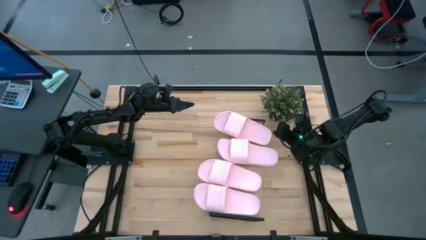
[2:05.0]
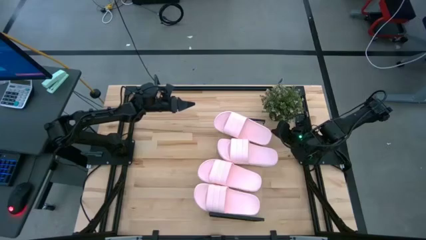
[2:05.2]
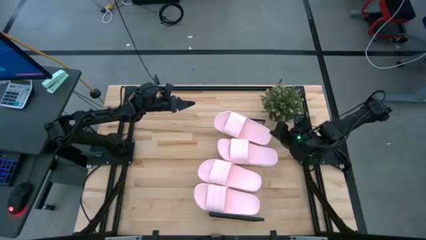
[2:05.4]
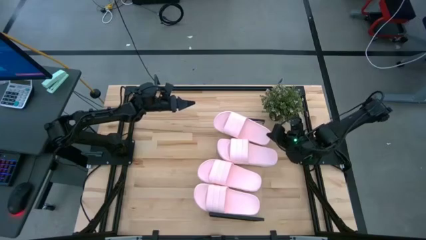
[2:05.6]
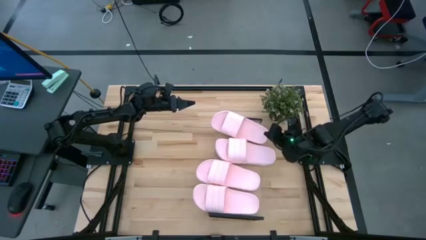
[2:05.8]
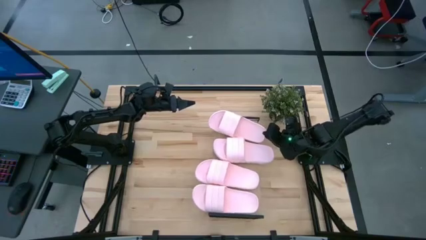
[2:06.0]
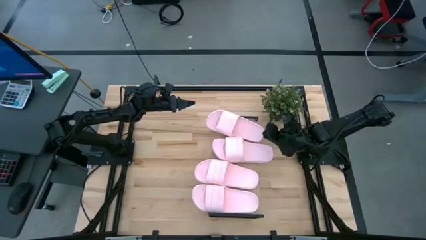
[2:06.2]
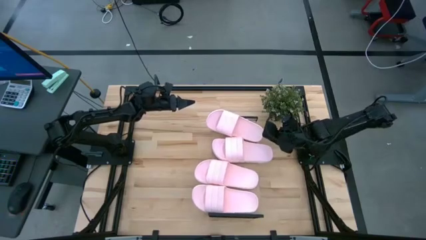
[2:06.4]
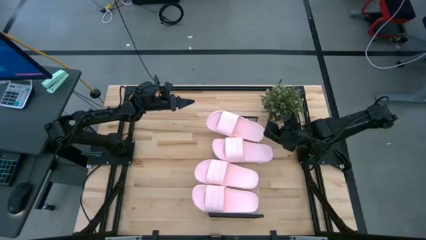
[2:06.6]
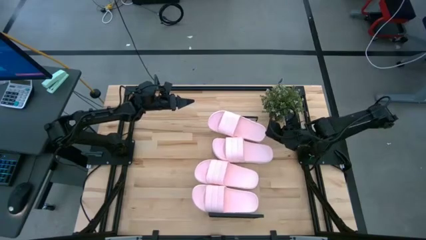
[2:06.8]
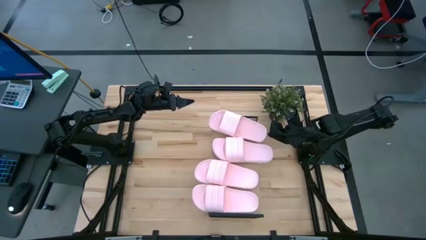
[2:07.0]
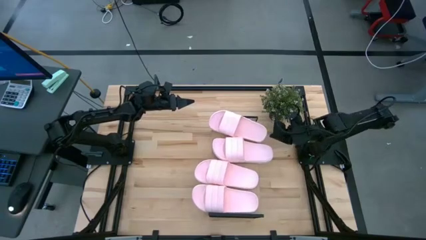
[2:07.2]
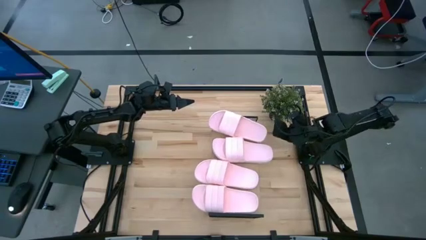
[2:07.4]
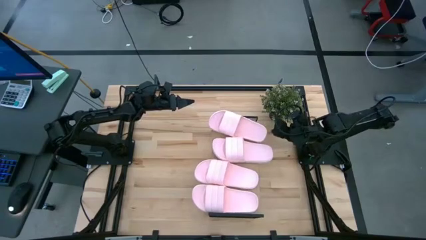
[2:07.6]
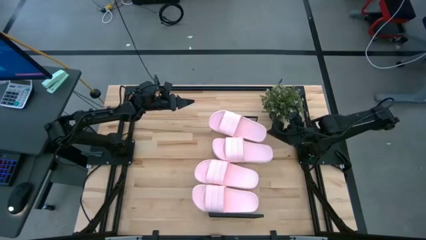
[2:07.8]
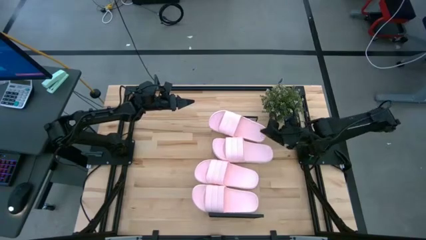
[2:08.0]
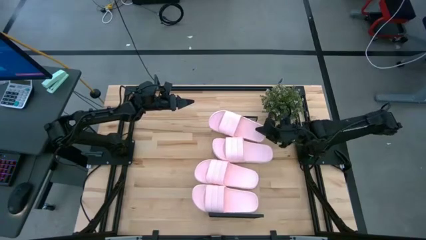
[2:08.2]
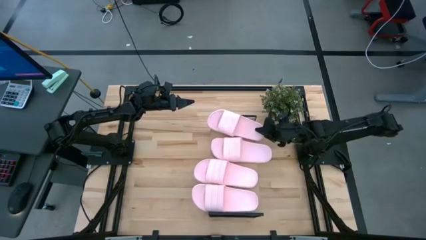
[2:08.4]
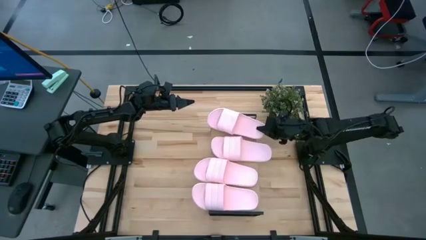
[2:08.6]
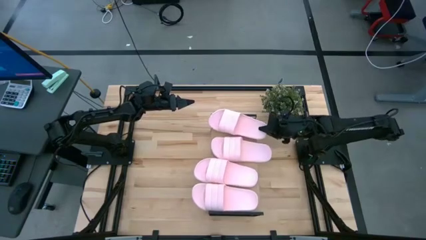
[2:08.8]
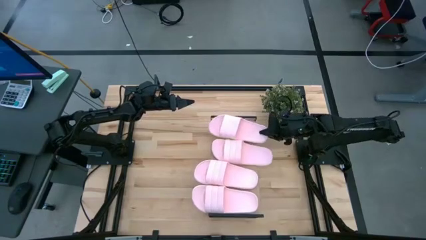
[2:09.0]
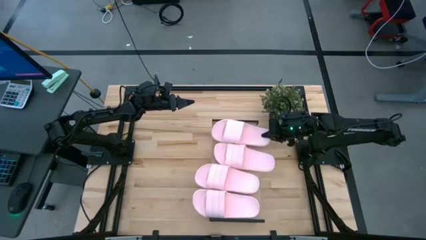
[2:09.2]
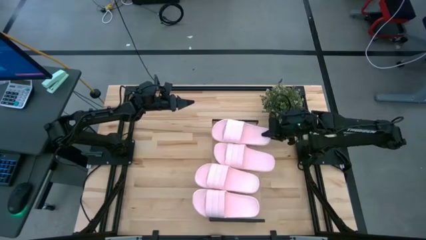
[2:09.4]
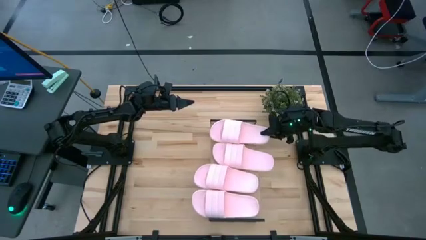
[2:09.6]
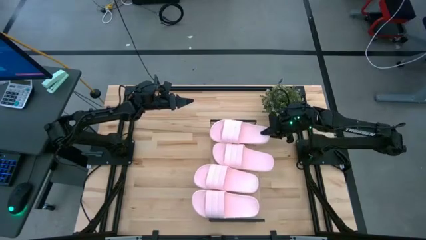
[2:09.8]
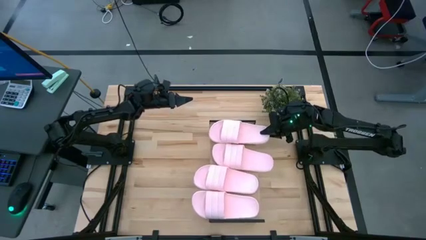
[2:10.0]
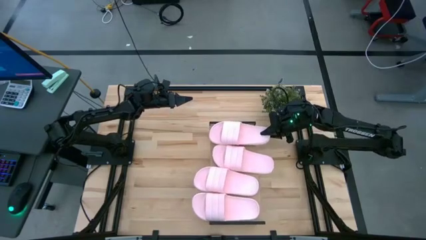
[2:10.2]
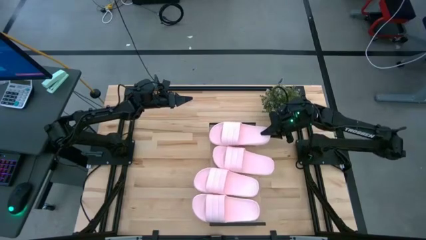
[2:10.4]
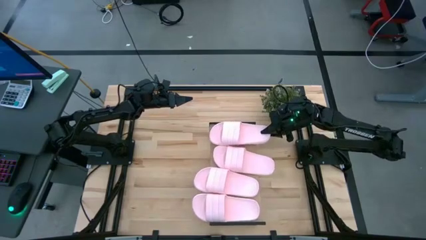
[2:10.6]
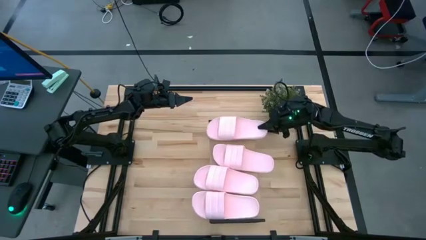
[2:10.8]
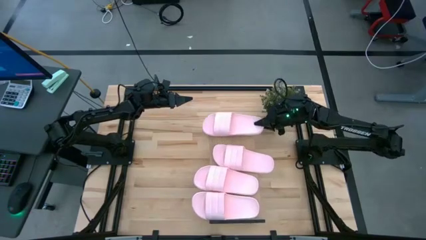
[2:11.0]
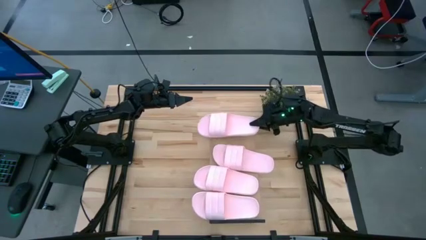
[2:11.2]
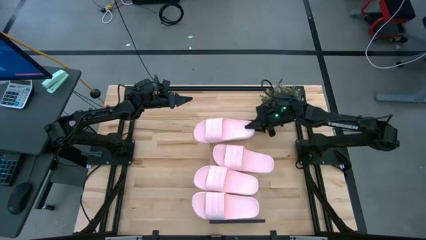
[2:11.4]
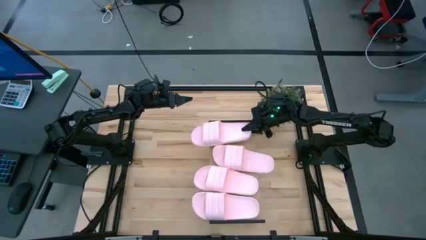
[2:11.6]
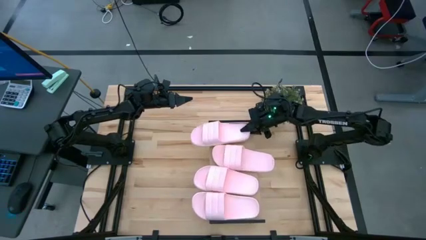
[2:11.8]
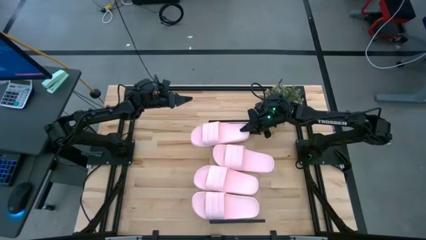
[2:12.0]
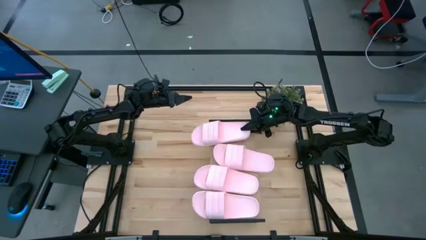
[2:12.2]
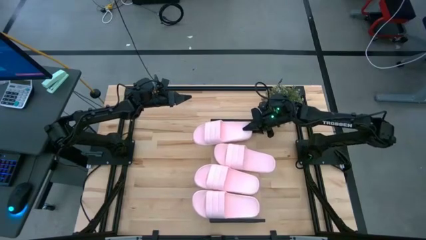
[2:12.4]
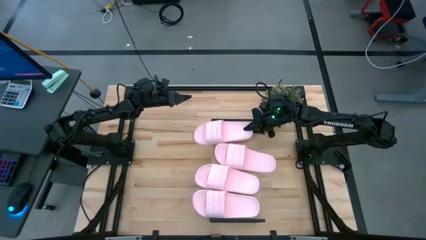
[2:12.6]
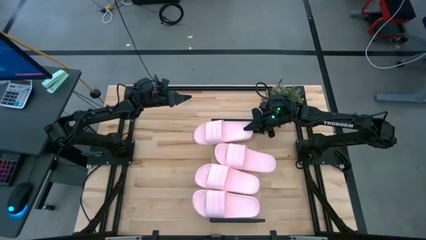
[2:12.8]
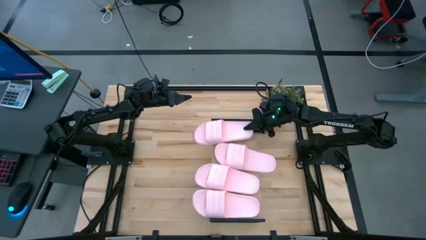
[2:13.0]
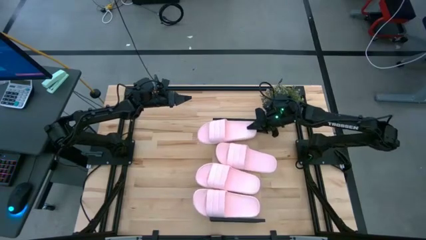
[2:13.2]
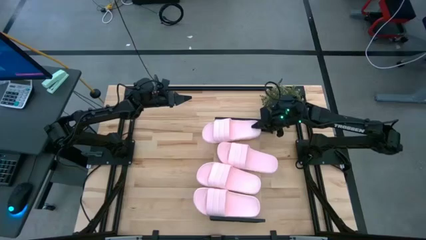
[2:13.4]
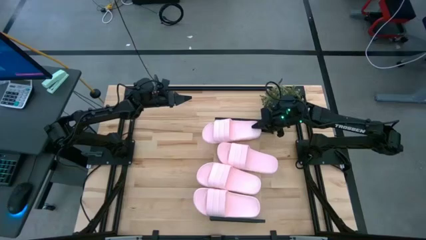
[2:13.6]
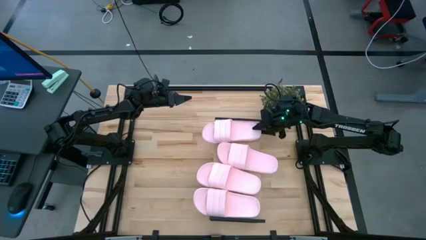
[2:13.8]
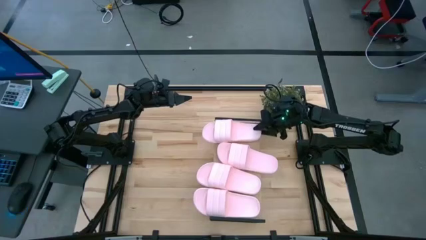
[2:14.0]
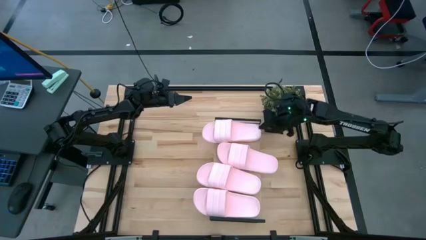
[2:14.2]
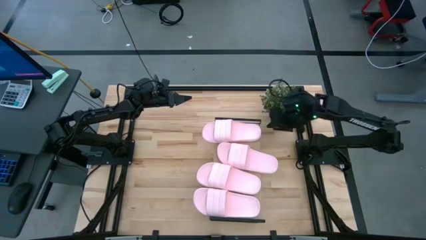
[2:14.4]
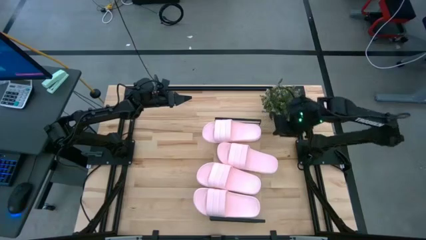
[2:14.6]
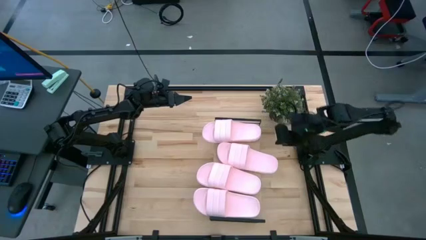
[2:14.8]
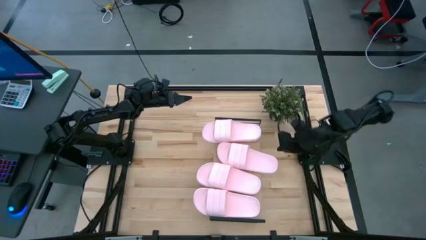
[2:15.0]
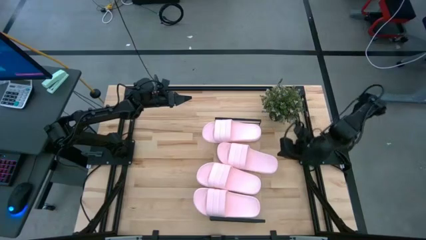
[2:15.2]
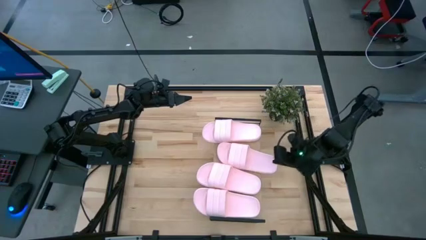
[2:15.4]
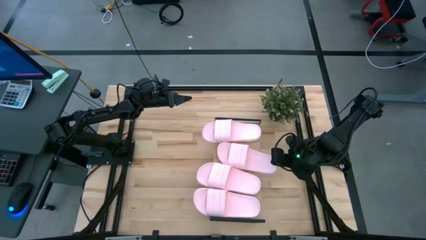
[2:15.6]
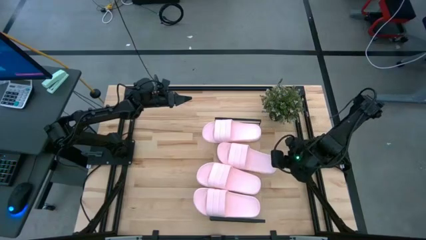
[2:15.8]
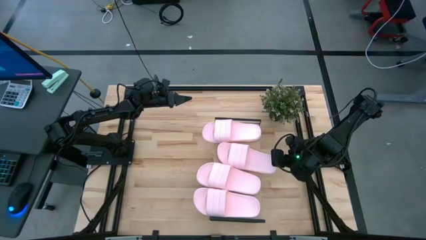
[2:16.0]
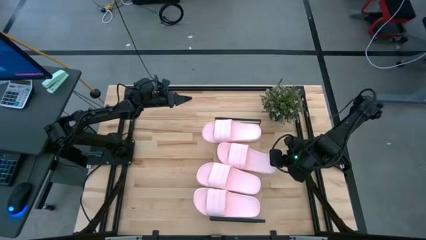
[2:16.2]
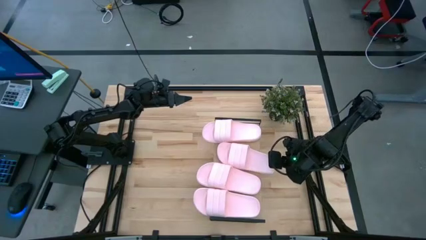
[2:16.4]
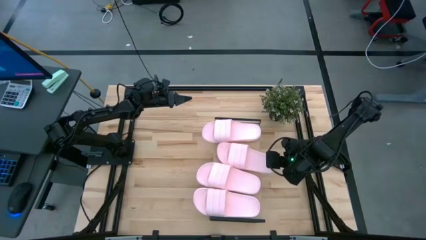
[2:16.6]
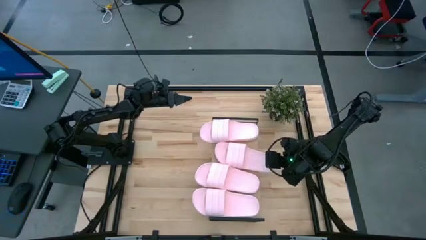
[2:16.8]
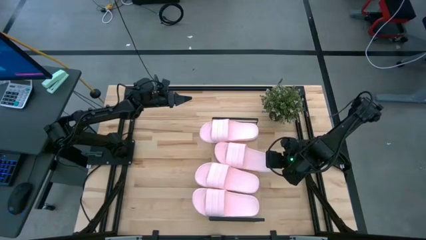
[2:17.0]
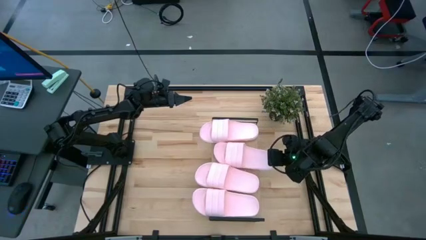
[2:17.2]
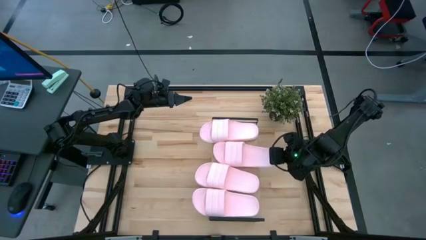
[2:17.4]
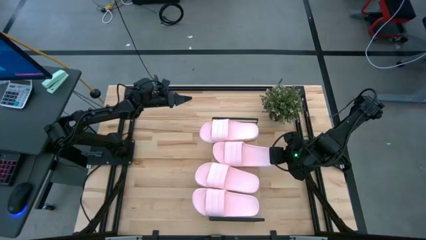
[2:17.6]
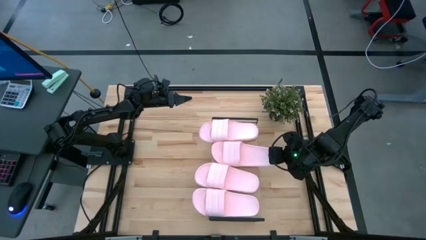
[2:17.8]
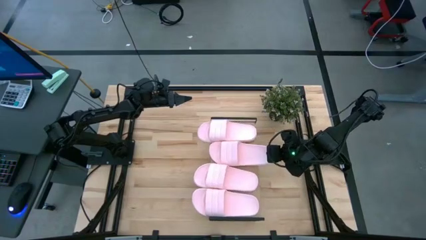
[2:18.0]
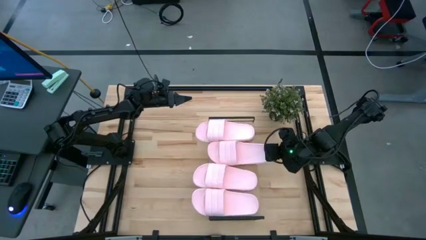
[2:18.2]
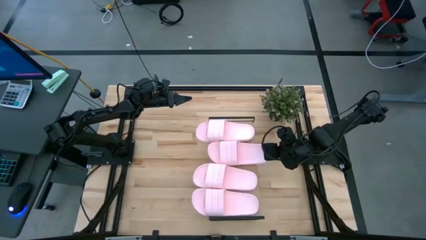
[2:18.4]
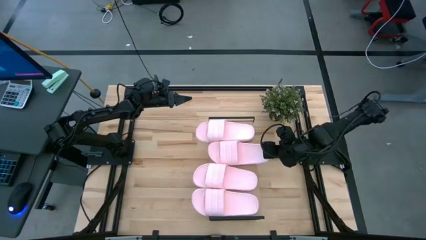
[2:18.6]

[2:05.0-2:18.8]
Task: Pick and place slides into the shelf
Adjust the pink slippers on the shelf
